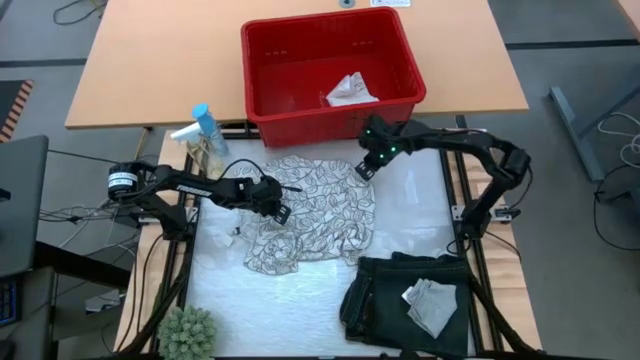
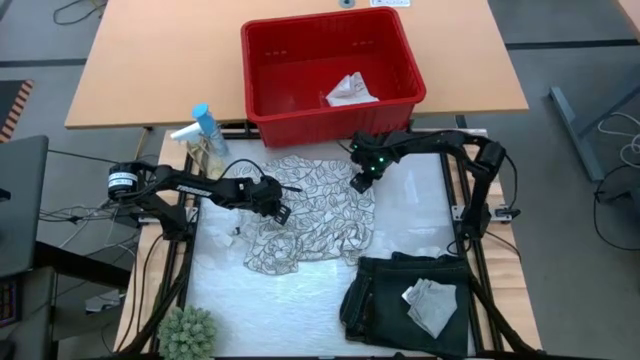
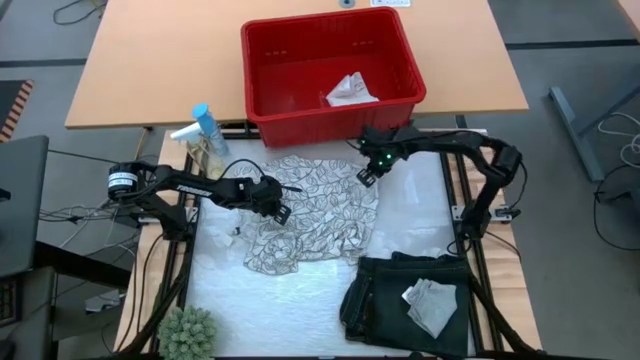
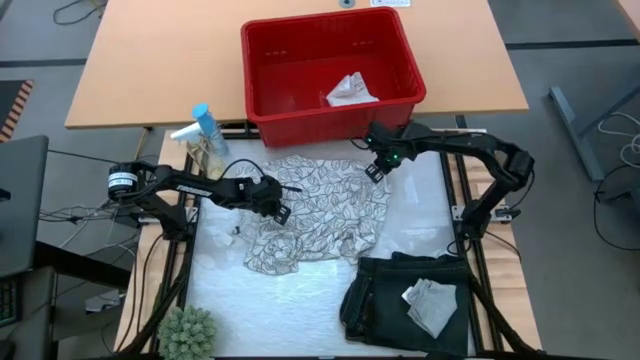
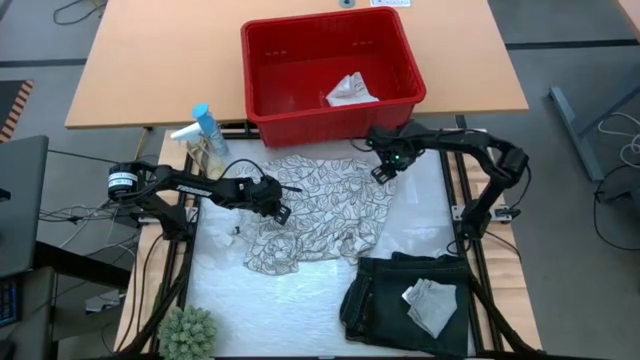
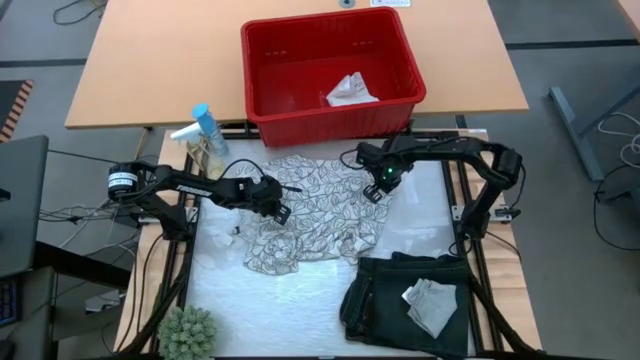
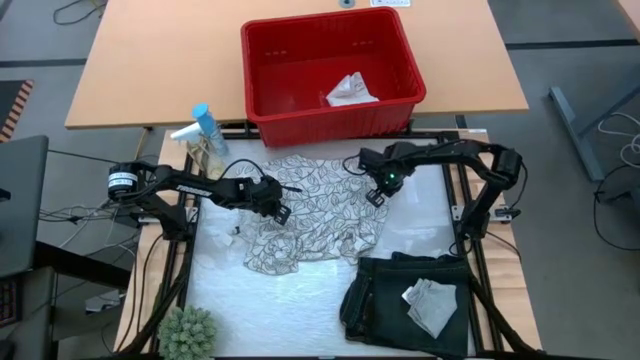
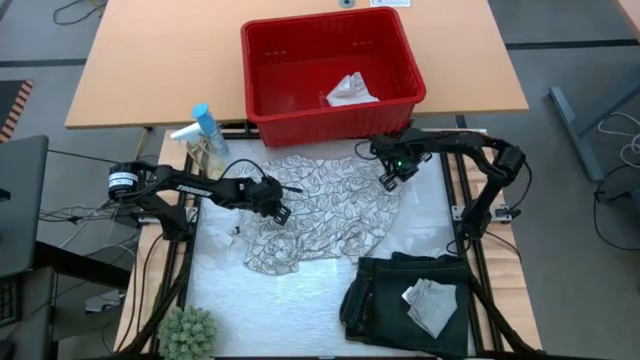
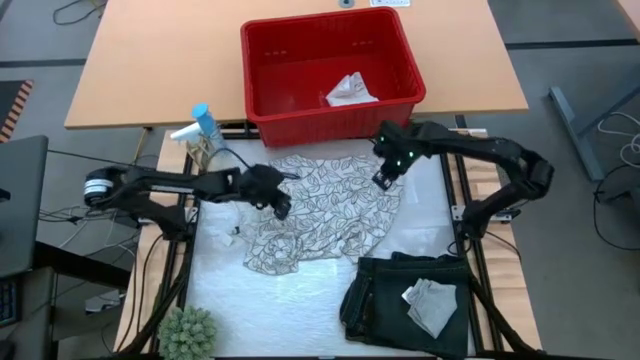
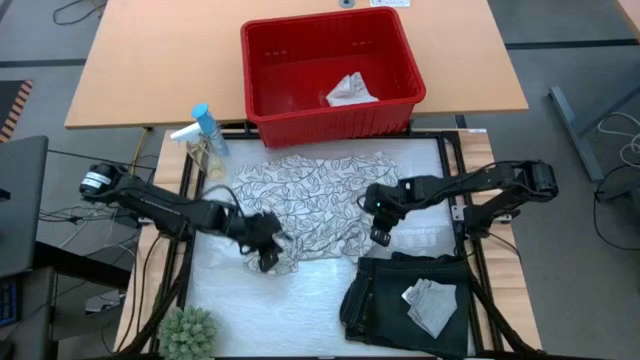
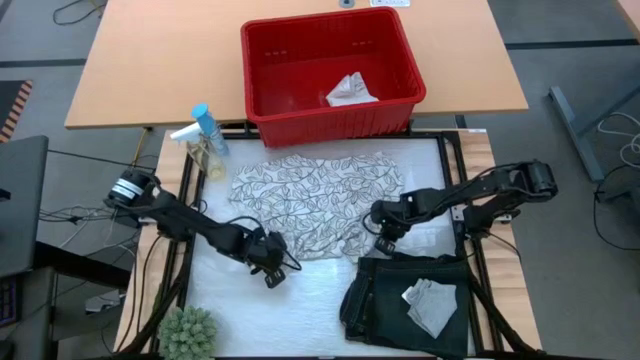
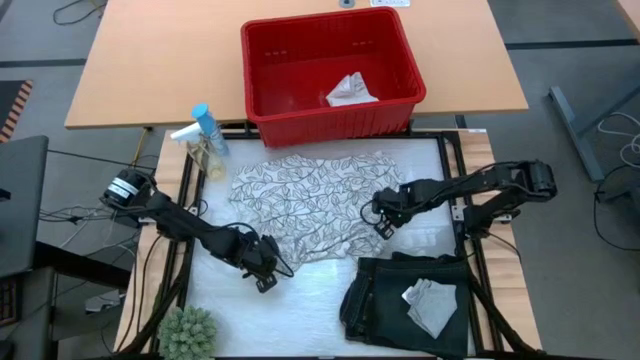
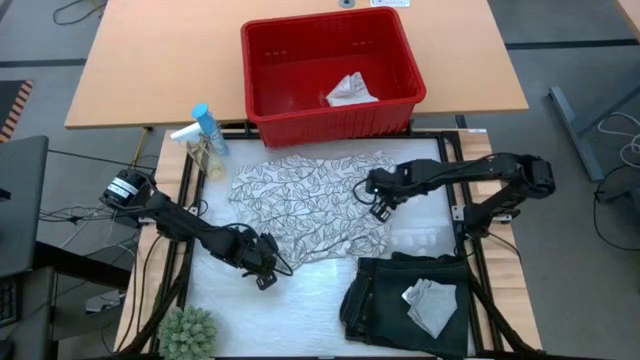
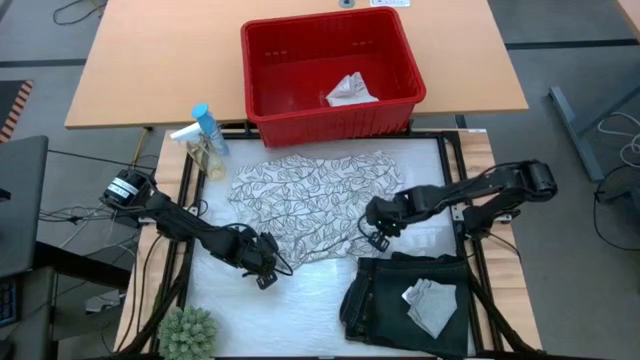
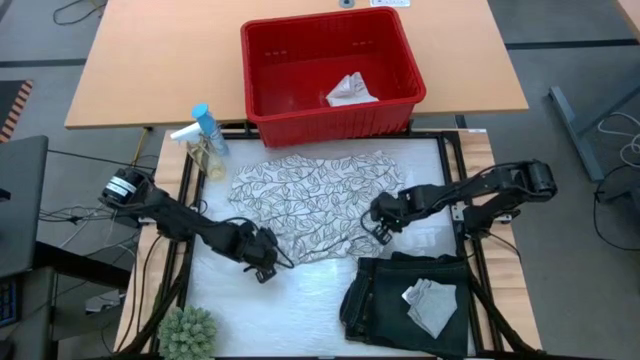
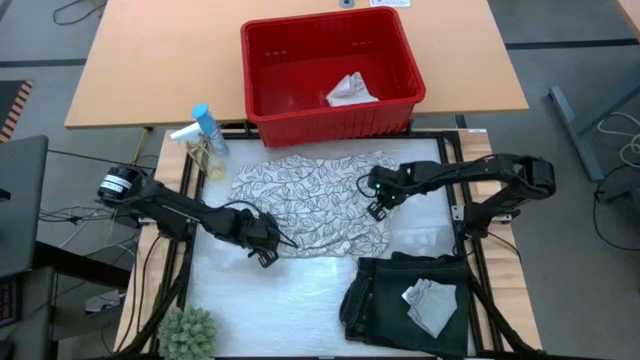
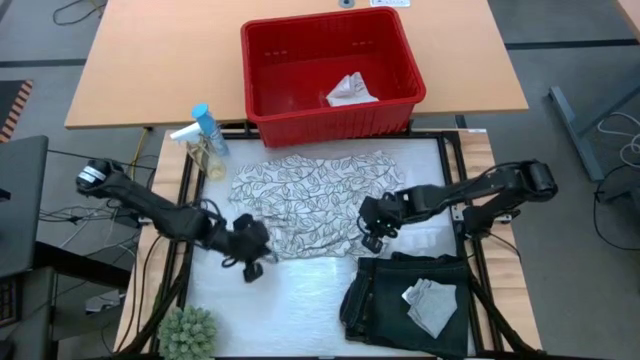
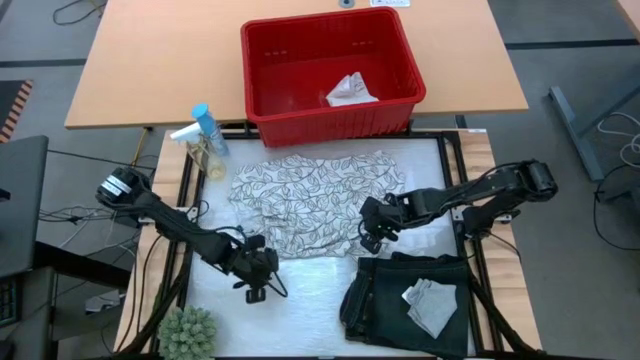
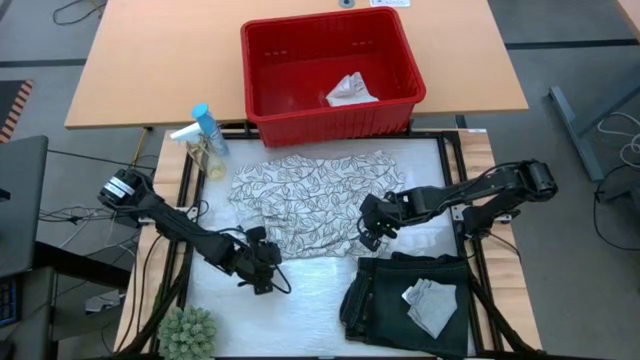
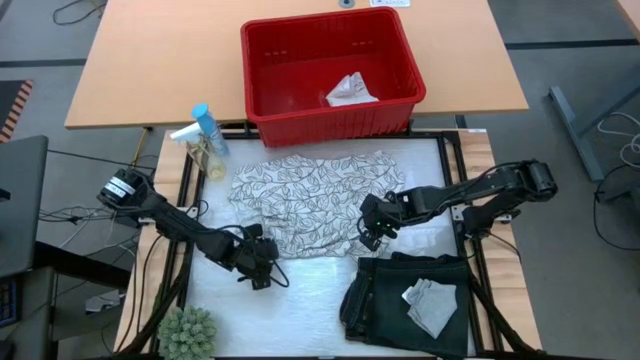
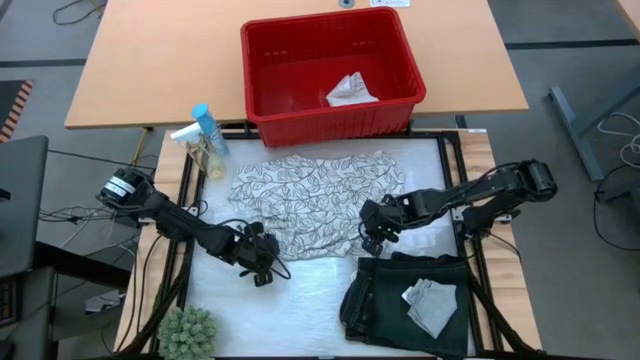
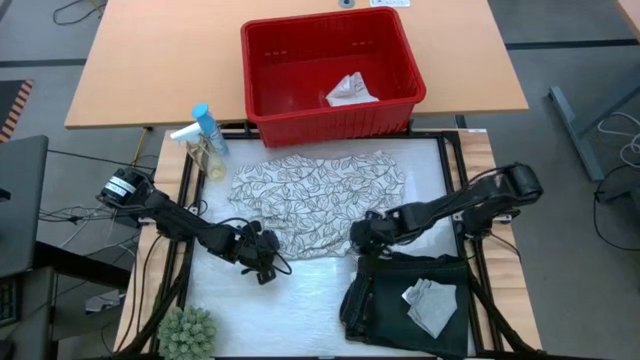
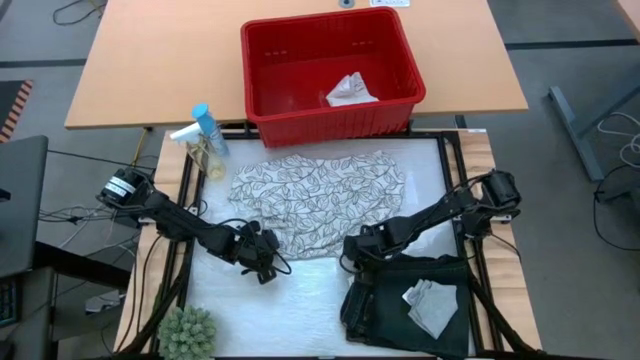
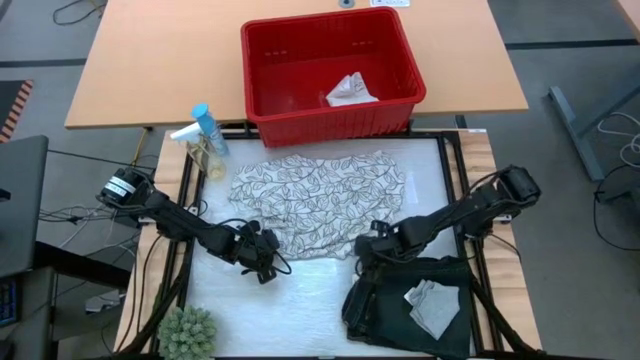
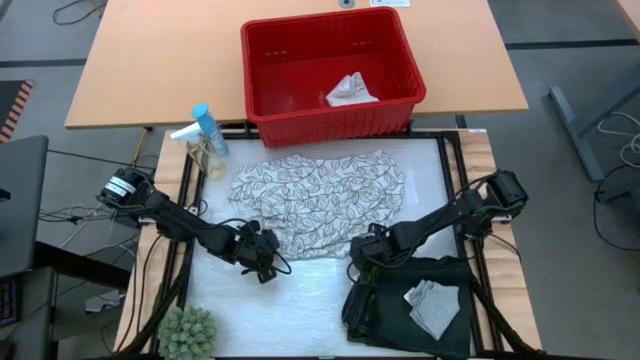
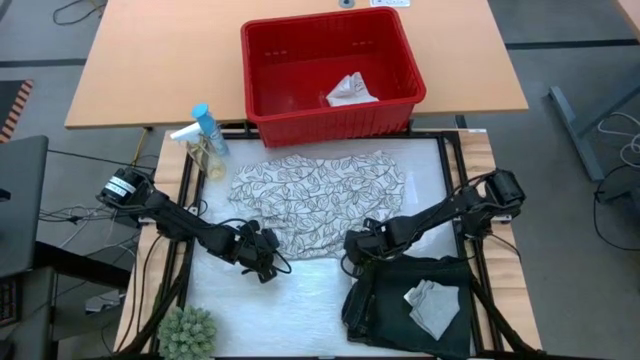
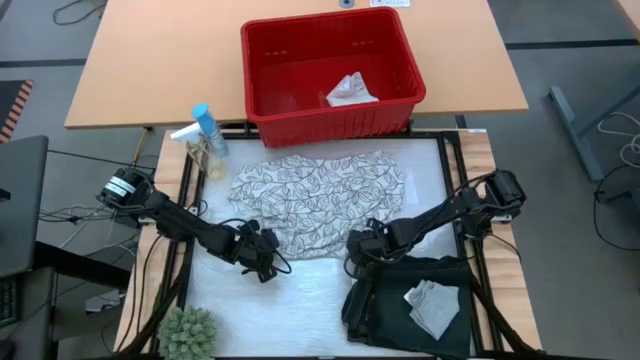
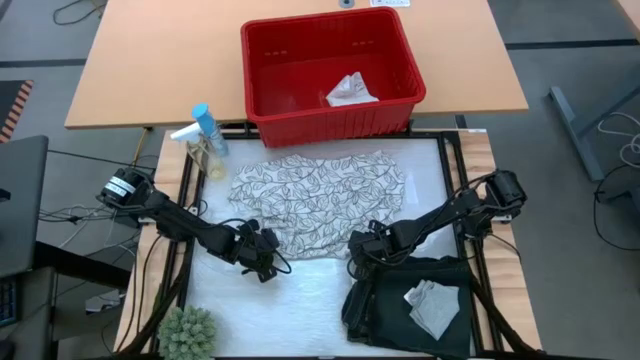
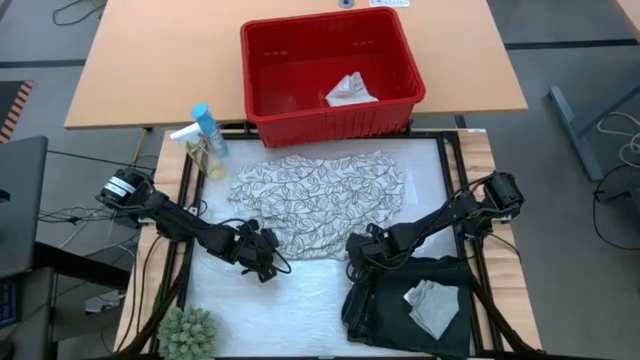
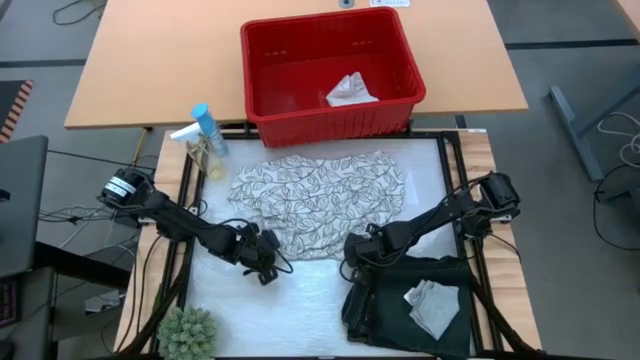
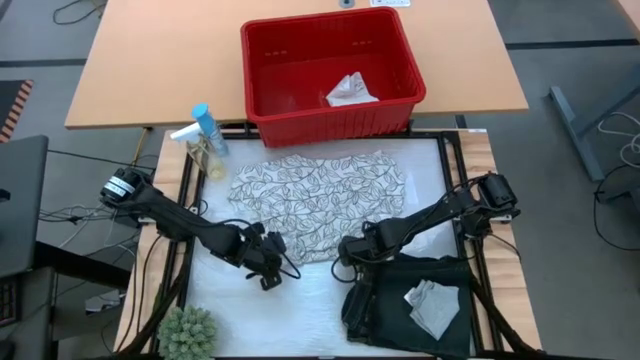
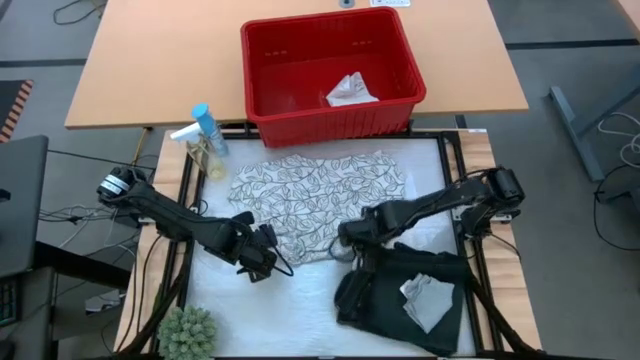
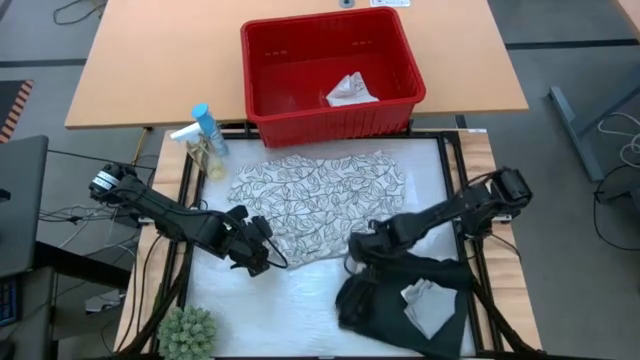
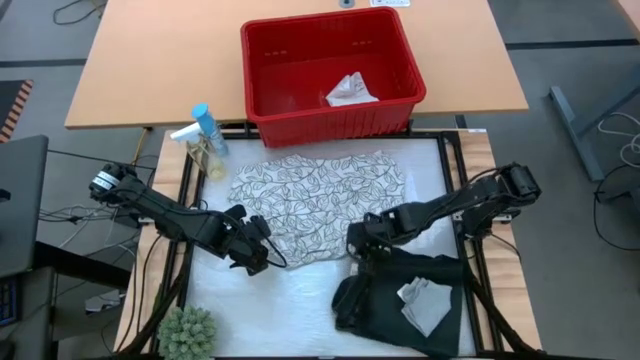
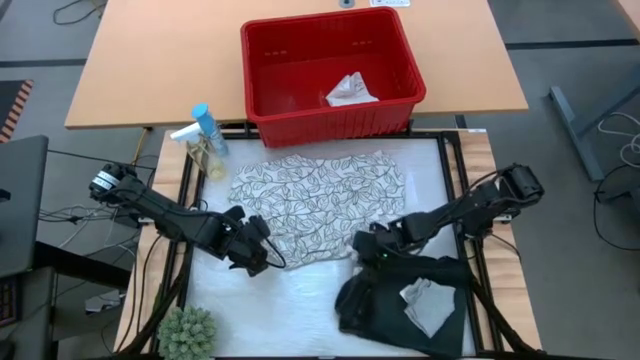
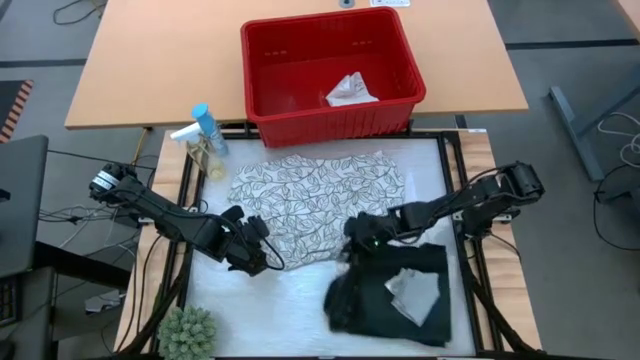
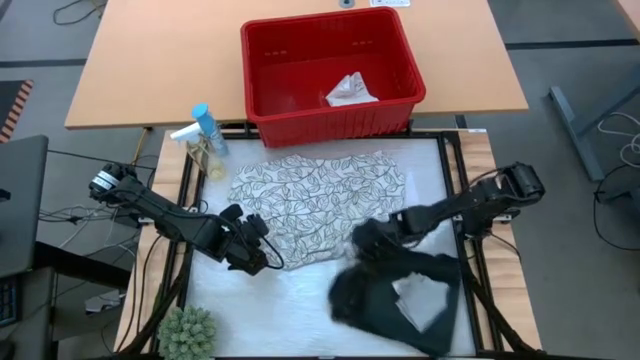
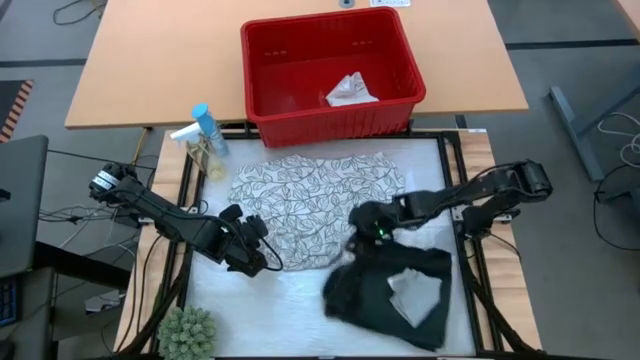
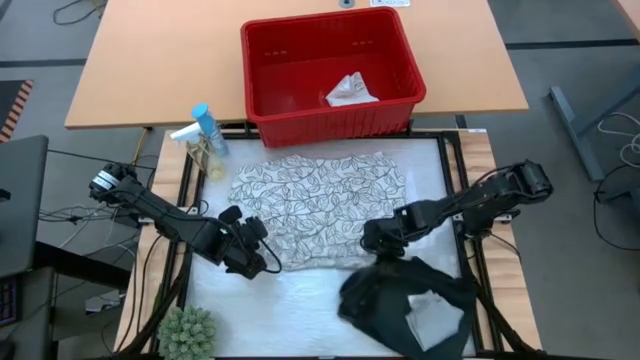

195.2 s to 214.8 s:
Task: Fold Laundry from Bin
Fold the white from the red laundry bin

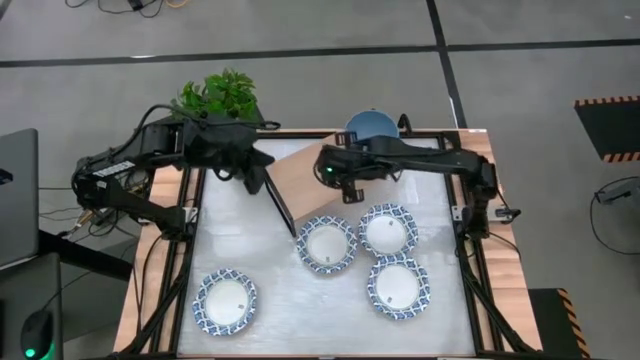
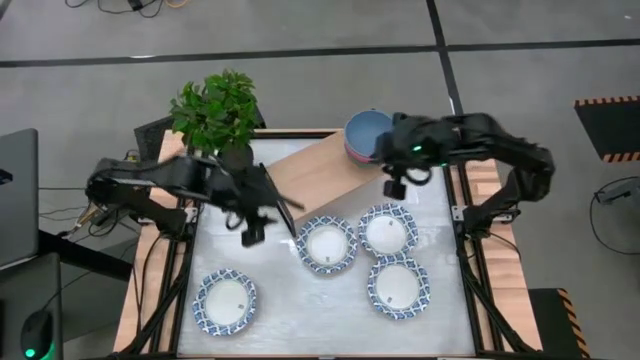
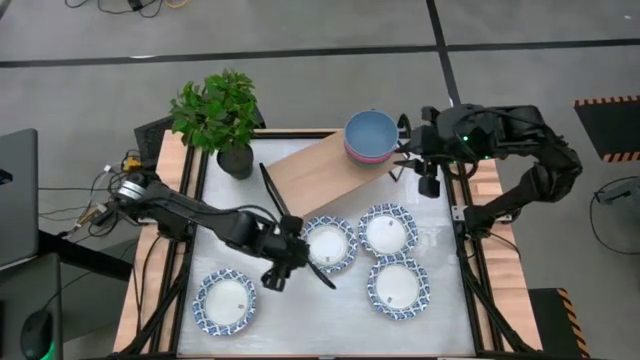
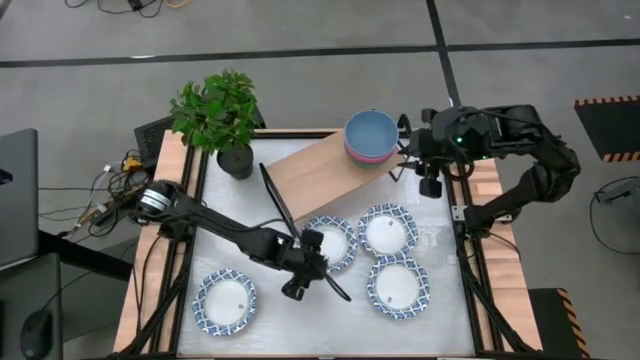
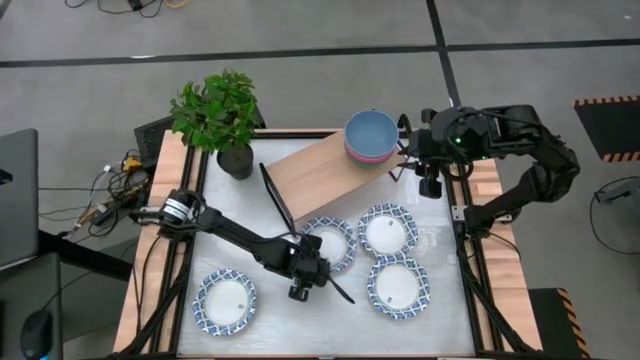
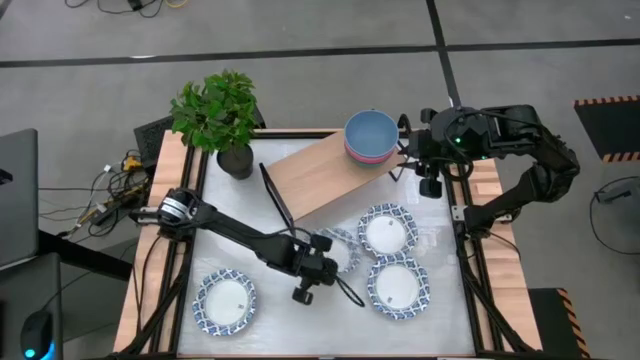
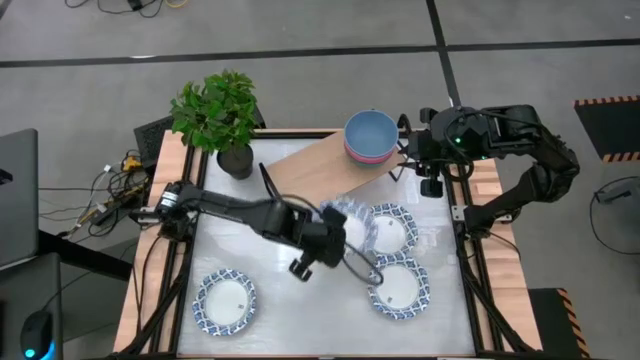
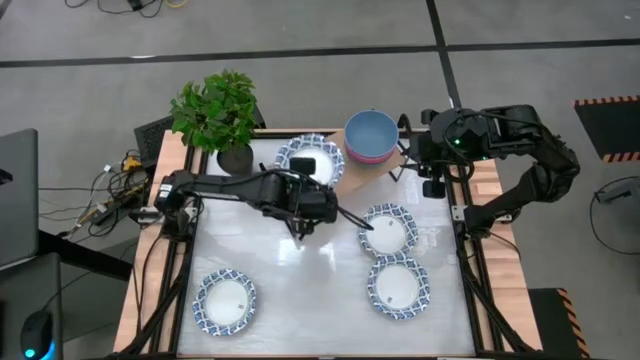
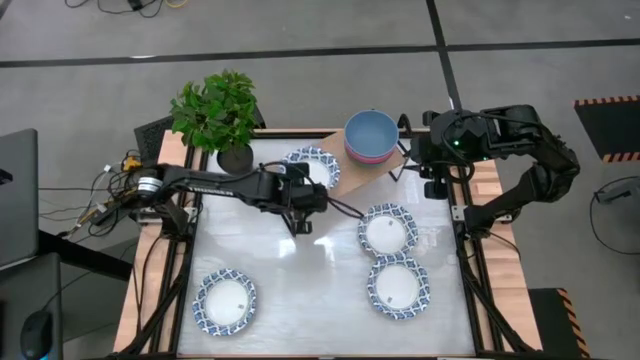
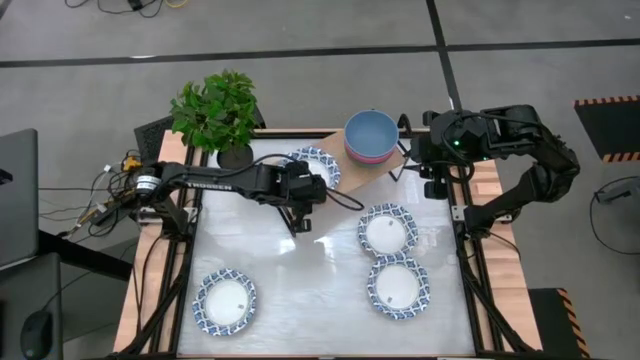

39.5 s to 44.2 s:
Task: Place and stack bowls onto a shelf
Put the white-blue patterned bowl on the shelf
